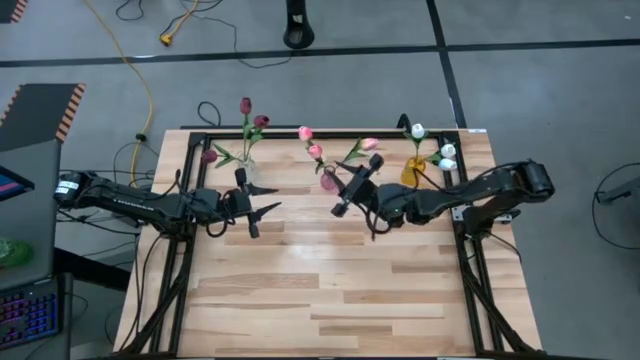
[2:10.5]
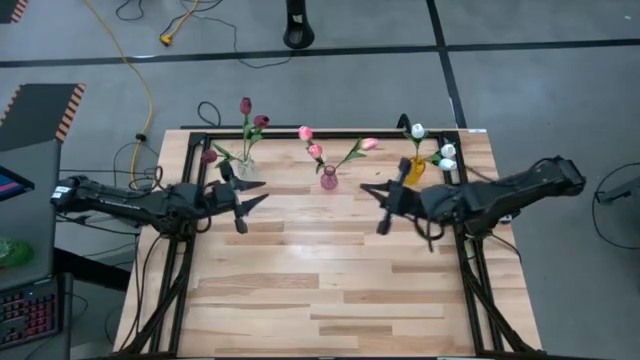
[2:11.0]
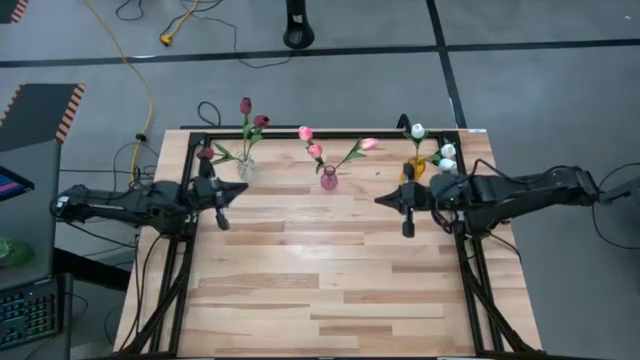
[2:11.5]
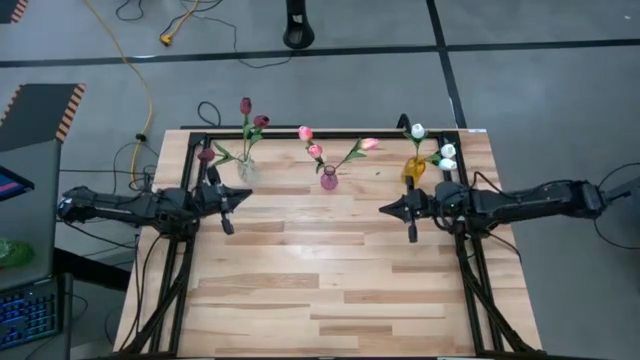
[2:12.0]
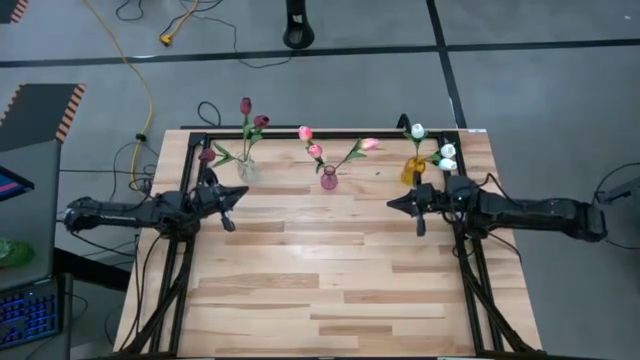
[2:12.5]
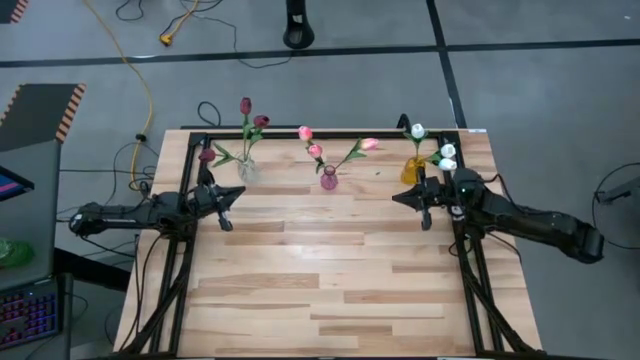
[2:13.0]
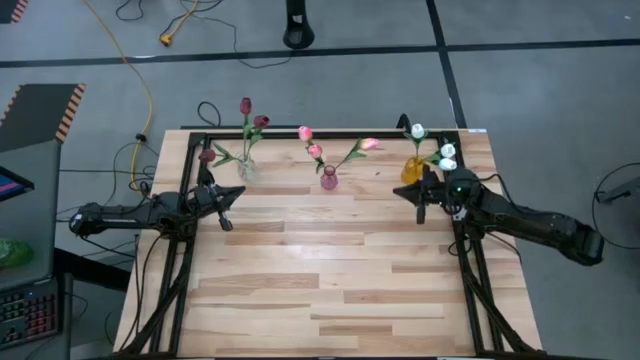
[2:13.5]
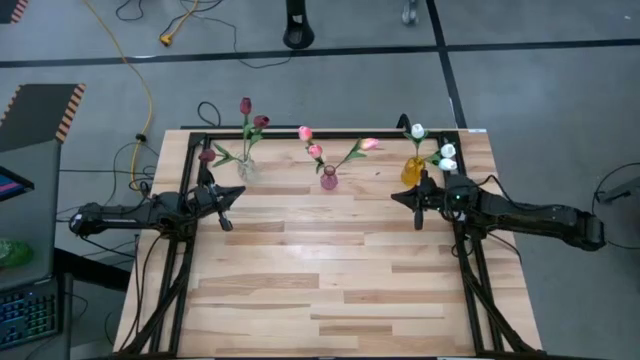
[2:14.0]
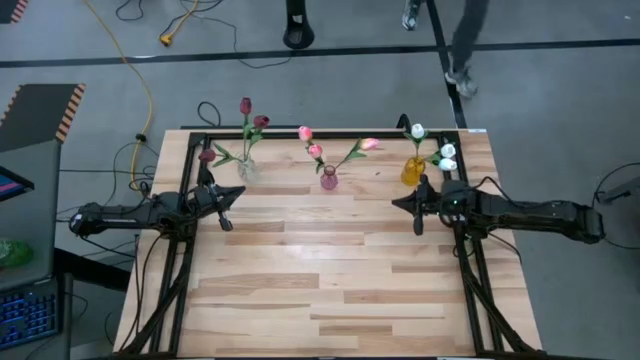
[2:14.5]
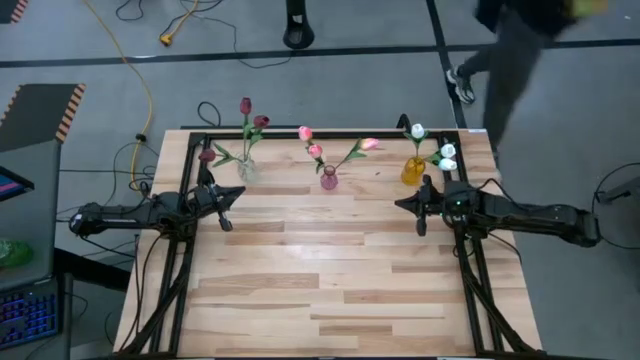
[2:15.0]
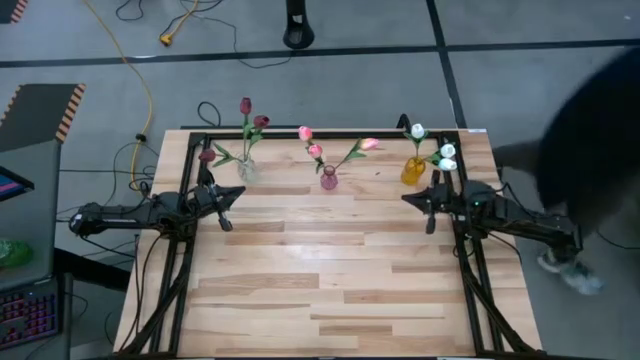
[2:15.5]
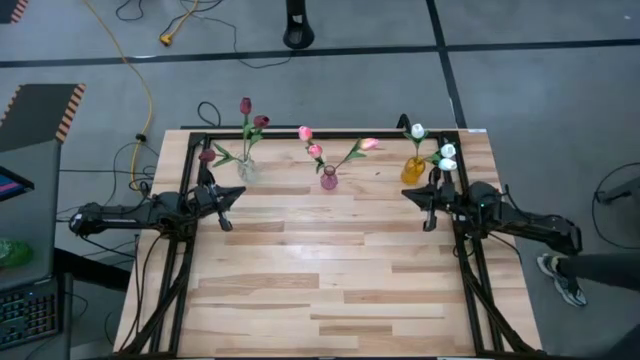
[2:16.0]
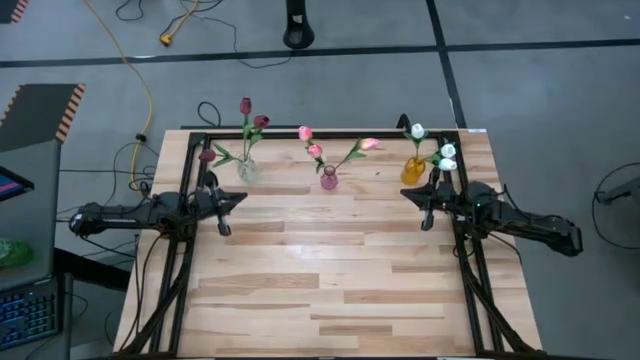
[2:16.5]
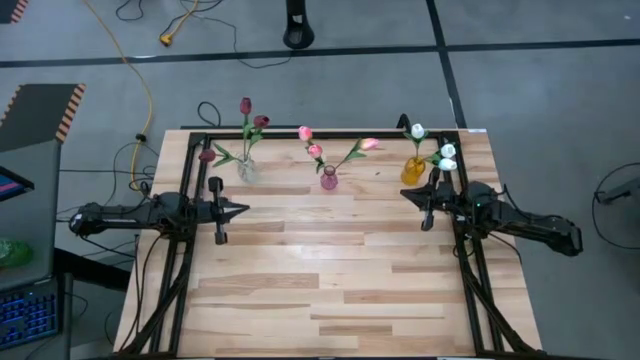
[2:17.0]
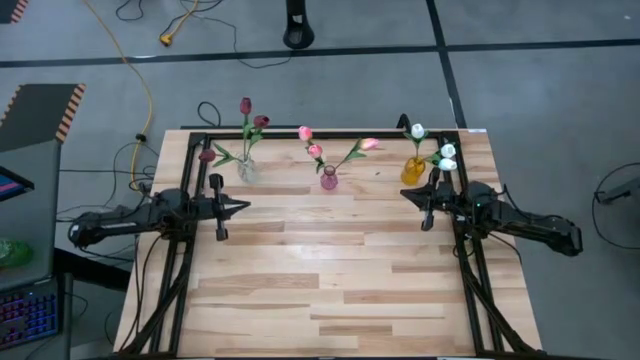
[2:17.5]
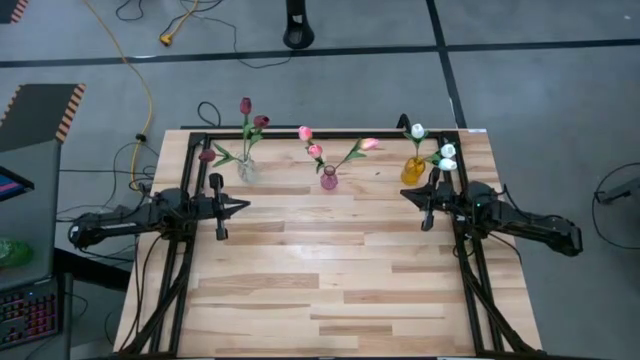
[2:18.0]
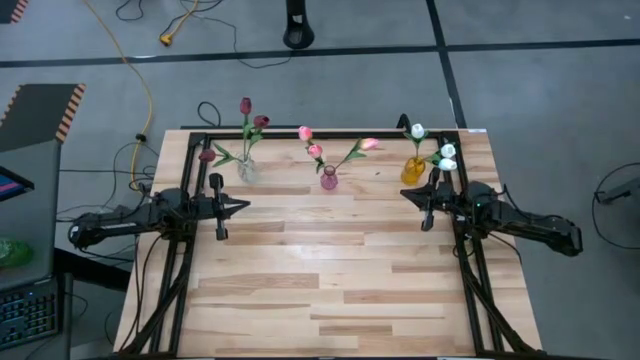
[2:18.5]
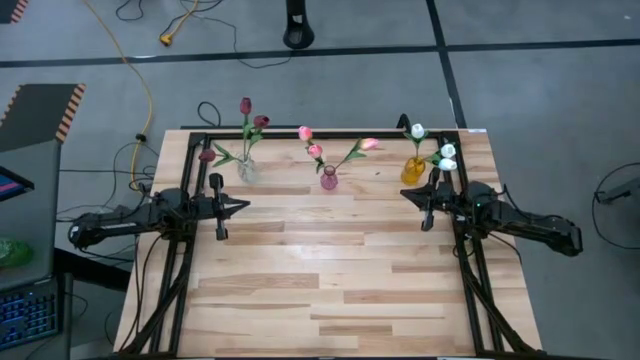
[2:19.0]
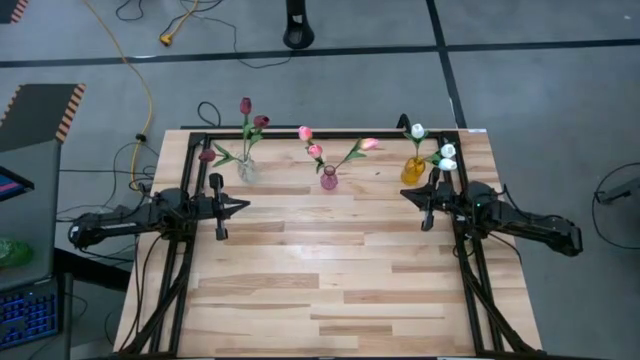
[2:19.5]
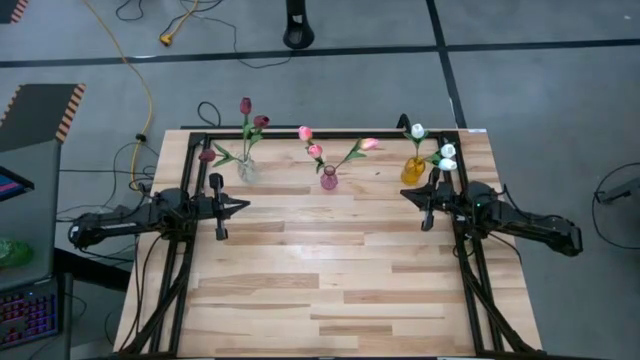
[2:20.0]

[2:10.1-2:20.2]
Task: Sort flowers into vase by color
Return to Home Position

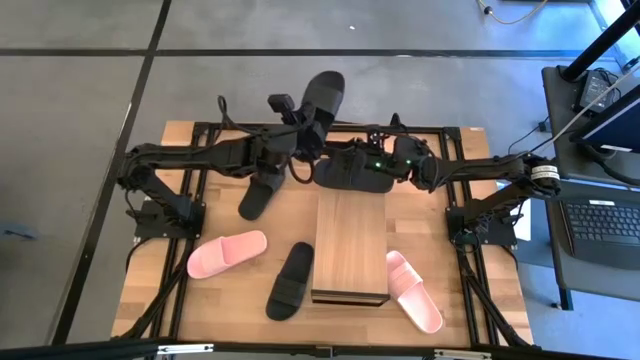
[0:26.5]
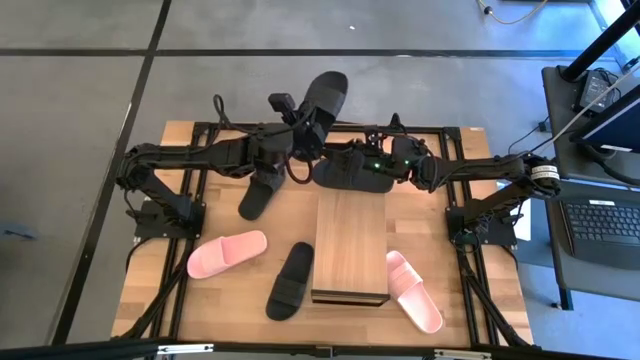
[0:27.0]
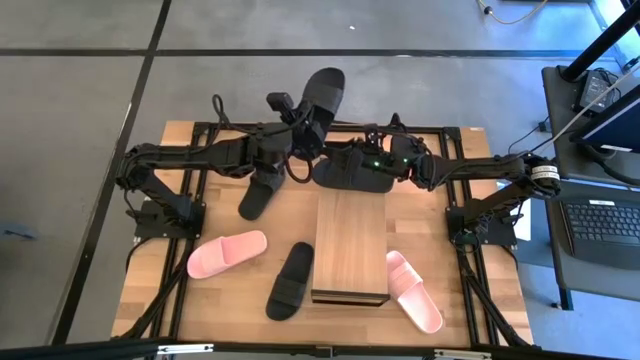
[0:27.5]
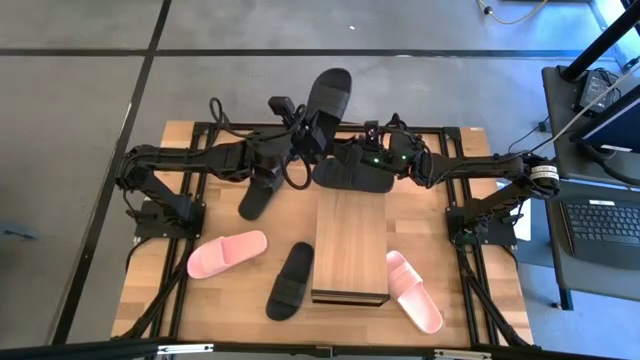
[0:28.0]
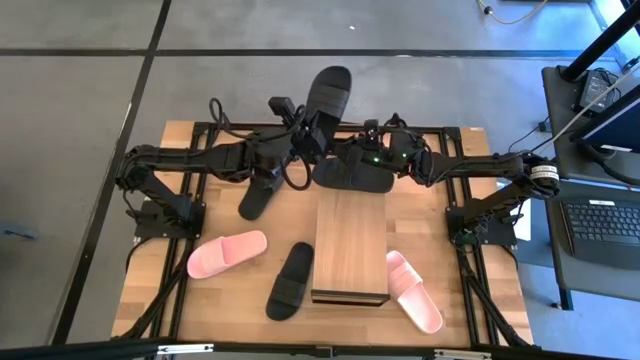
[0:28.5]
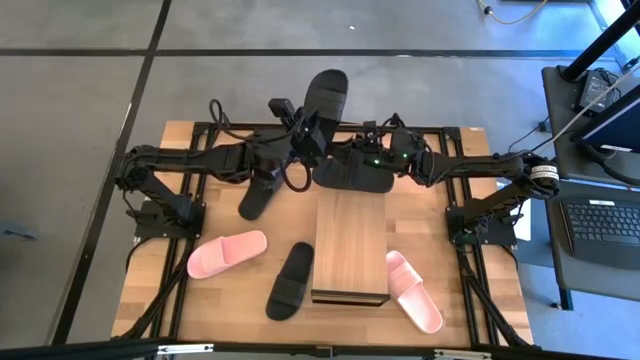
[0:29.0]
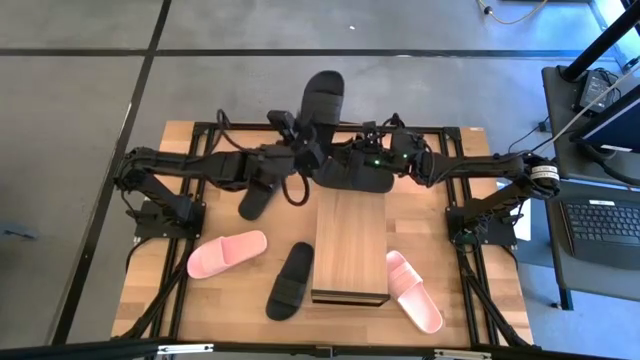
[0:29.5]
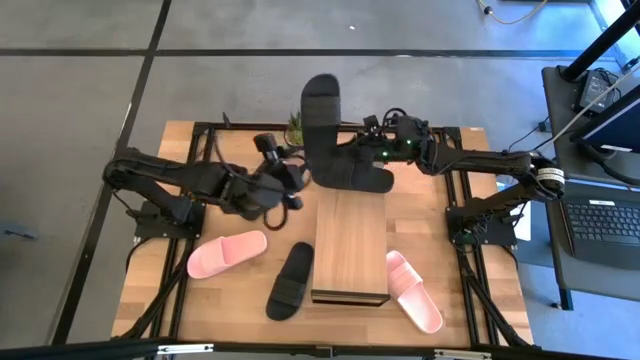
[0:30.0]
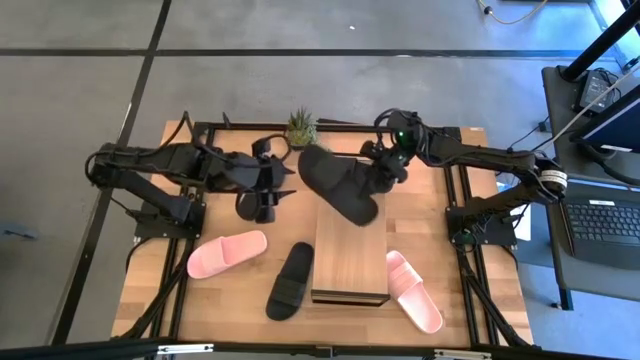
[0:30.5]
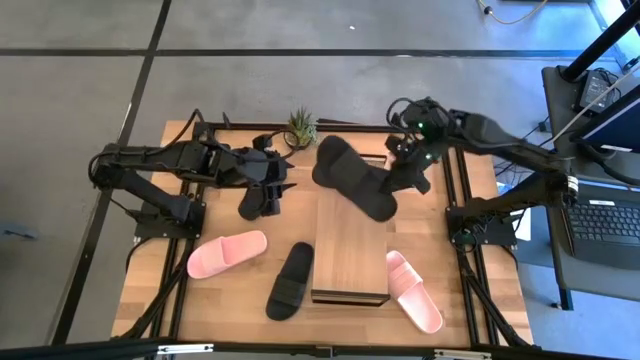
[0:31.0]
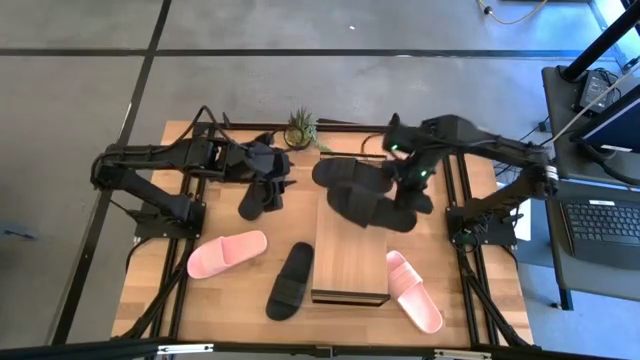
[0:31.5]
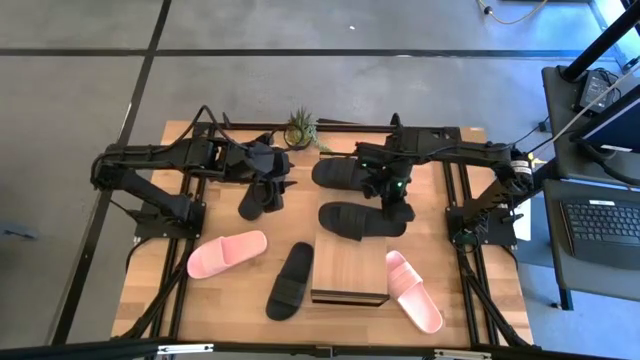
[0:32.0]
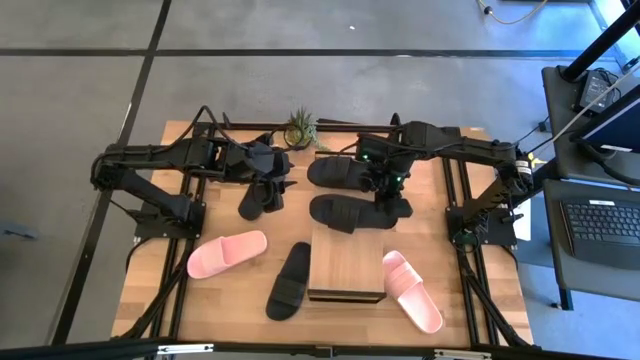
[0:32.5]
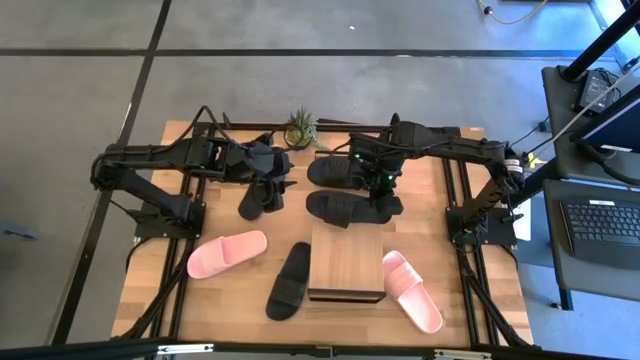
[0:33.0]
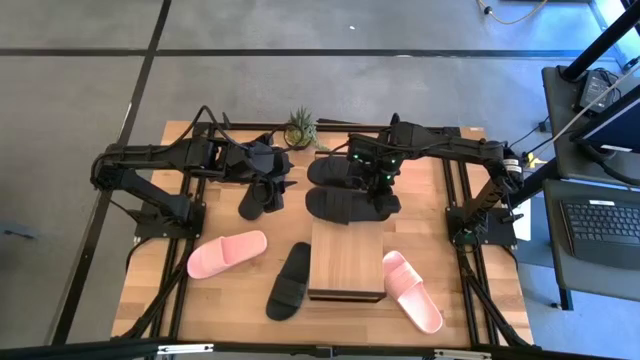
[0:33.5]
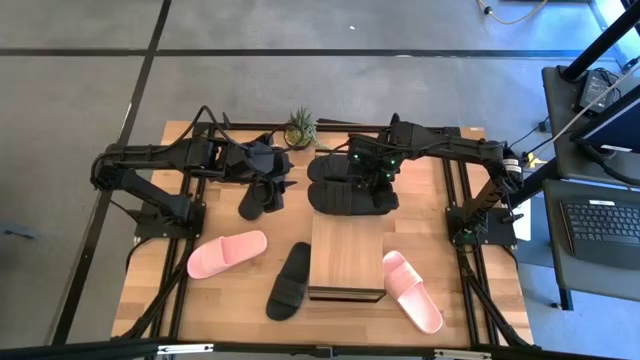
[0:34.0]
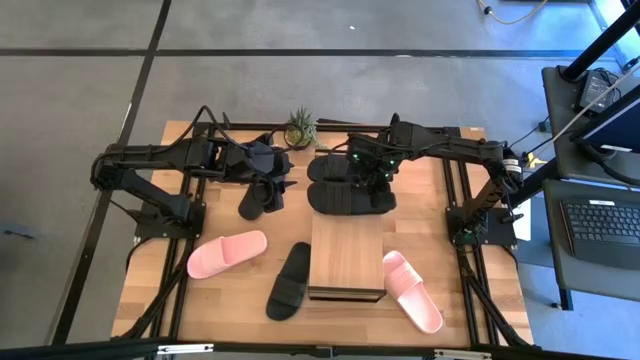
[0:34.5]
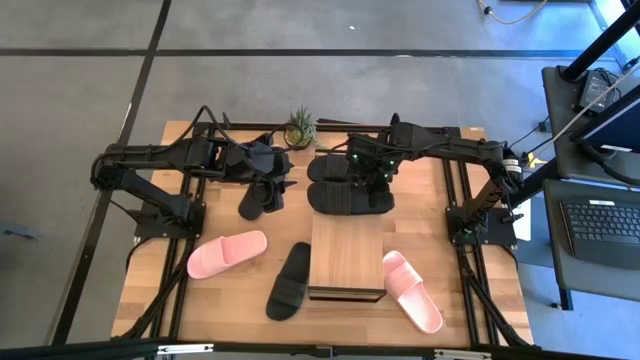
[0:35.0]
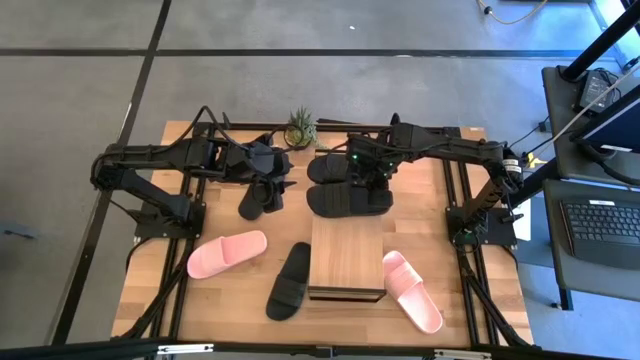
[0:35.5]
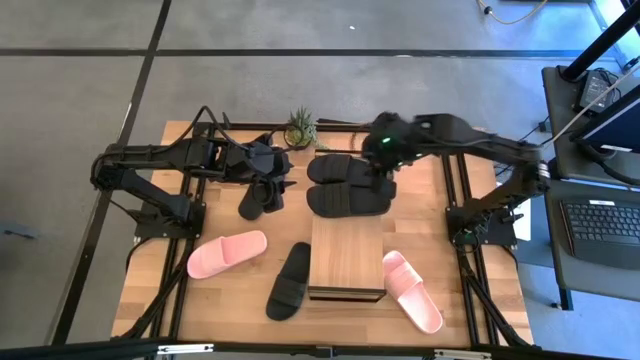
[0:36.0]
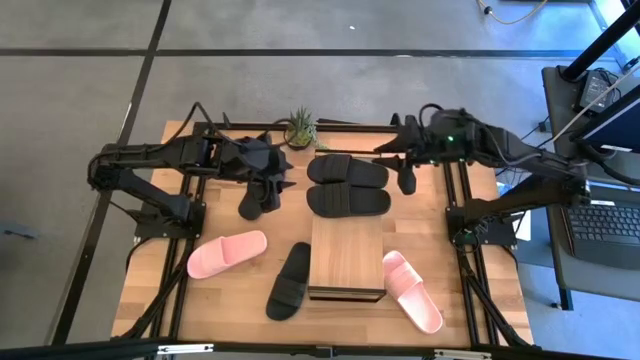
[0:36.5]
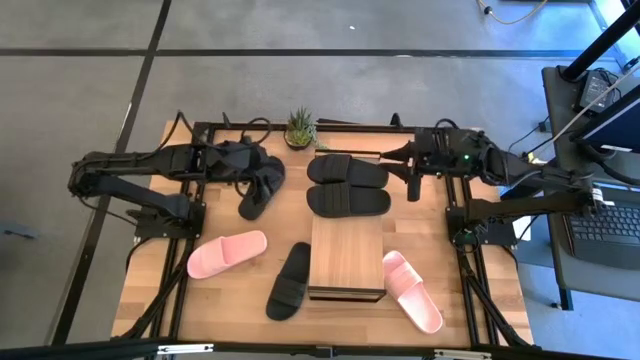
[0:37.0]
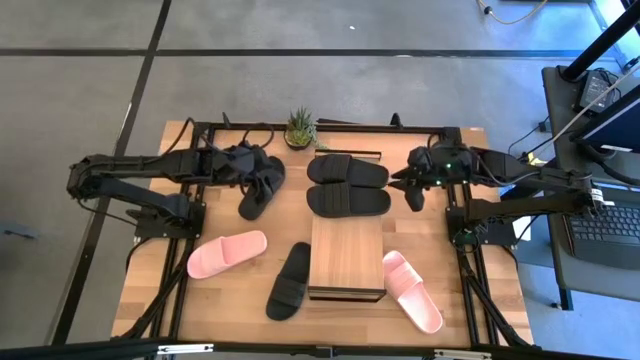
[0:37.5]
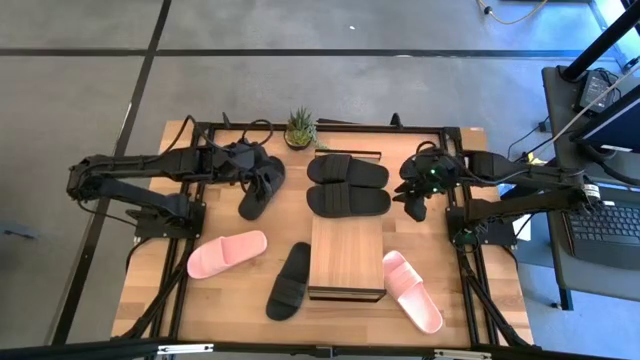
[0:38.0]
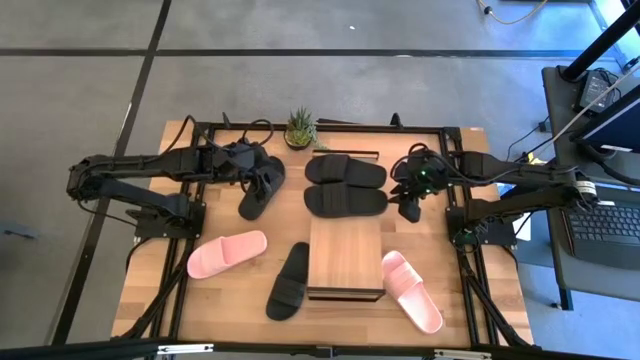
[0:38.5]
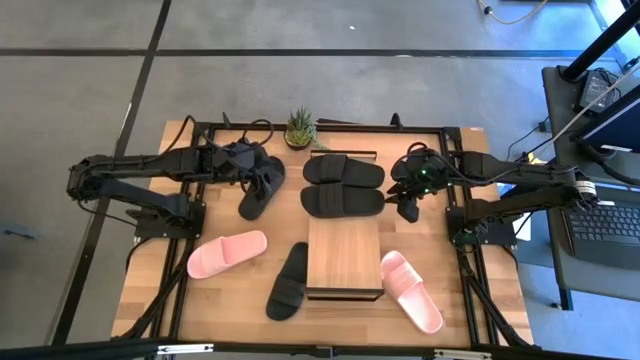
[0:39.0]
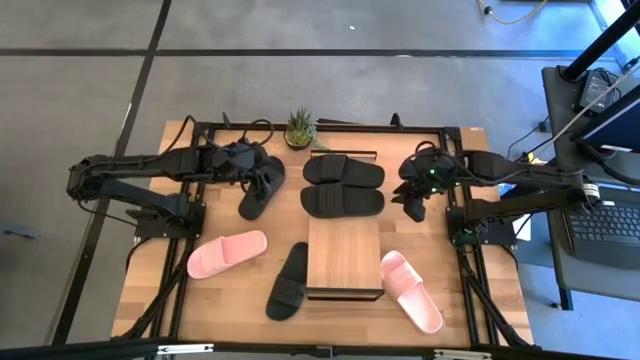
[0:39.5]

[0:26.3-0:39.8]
Task: Pick and place slides into the shelf
Put the black slipper on the shelf
